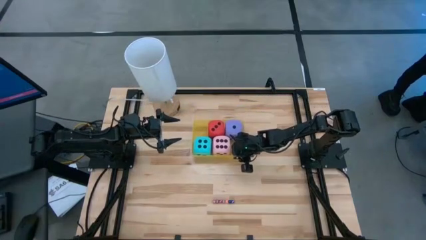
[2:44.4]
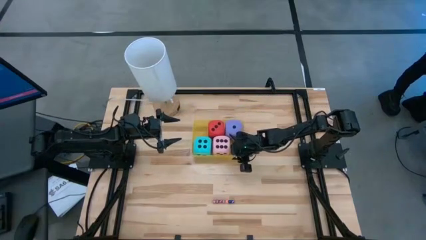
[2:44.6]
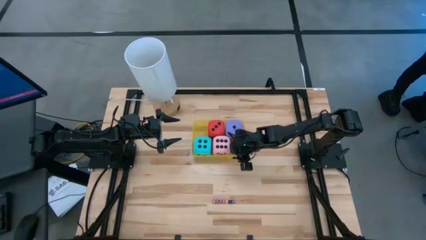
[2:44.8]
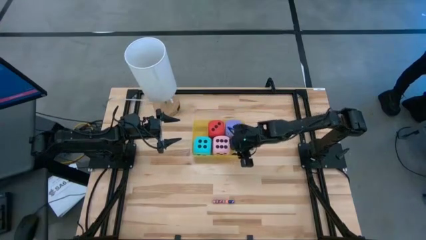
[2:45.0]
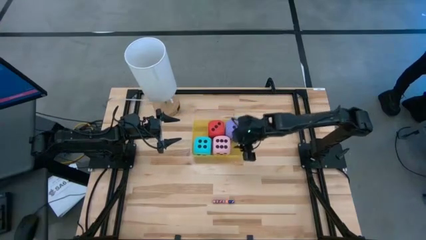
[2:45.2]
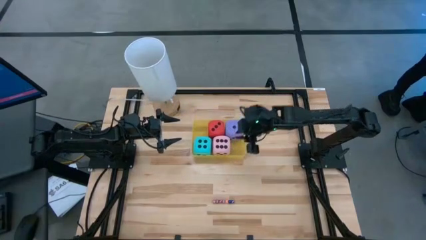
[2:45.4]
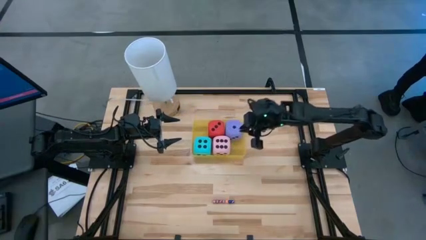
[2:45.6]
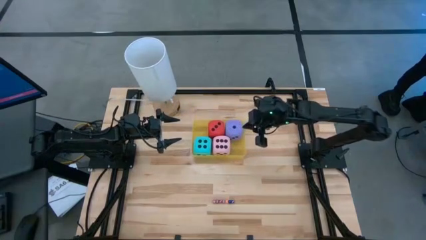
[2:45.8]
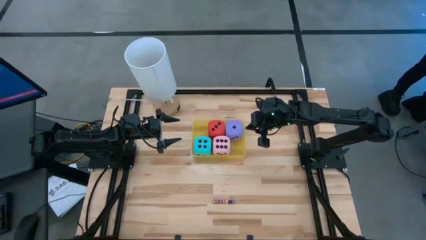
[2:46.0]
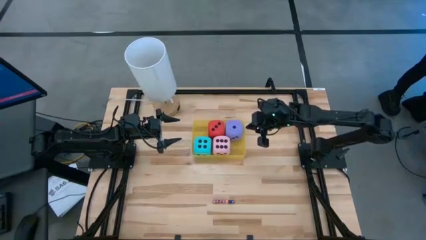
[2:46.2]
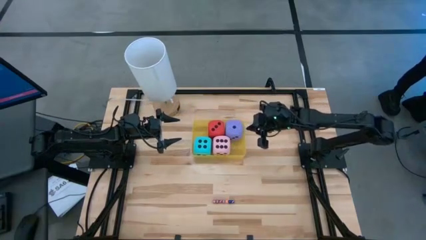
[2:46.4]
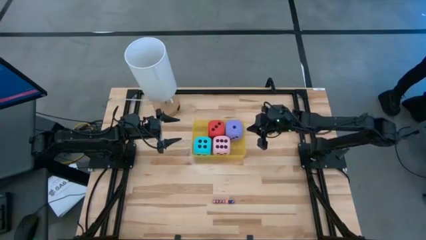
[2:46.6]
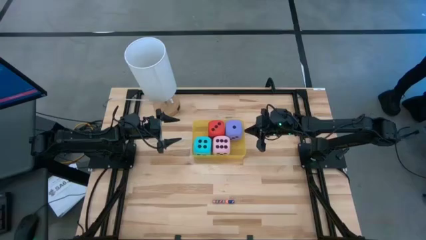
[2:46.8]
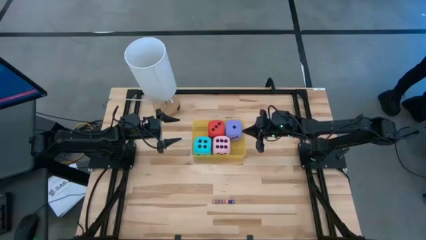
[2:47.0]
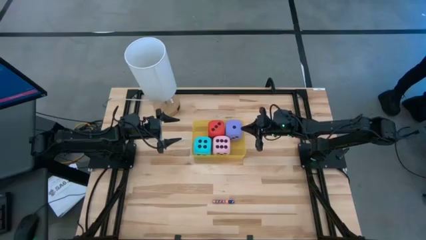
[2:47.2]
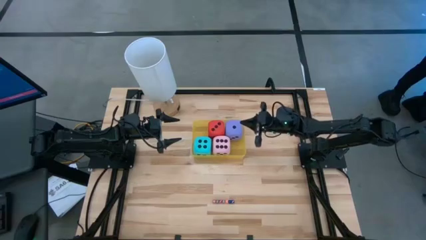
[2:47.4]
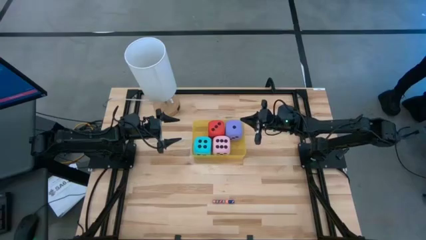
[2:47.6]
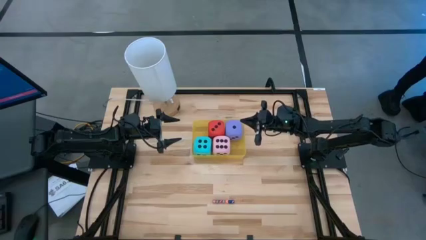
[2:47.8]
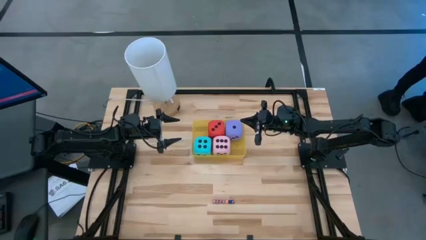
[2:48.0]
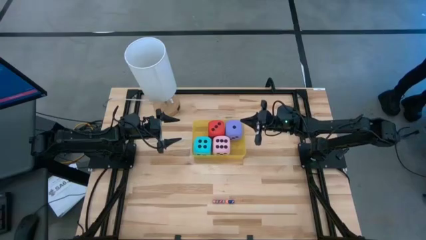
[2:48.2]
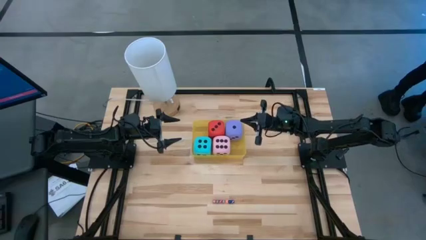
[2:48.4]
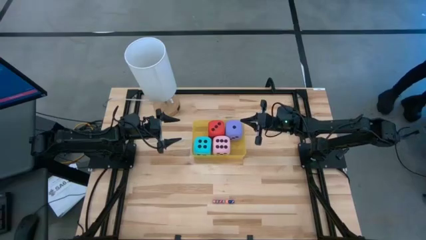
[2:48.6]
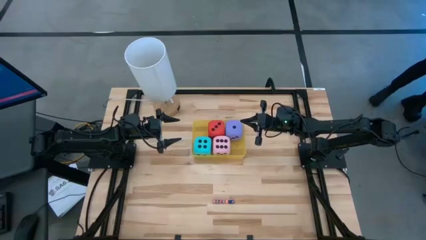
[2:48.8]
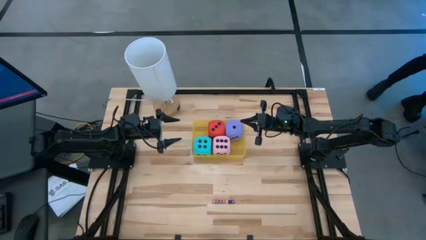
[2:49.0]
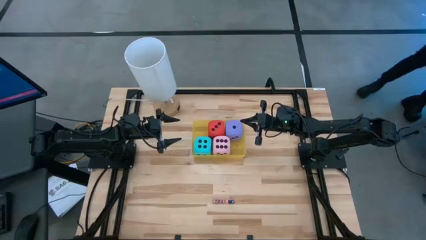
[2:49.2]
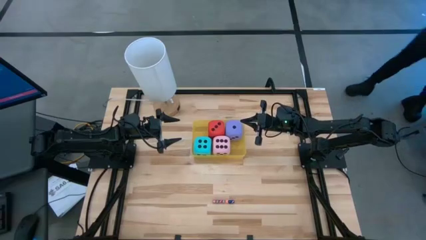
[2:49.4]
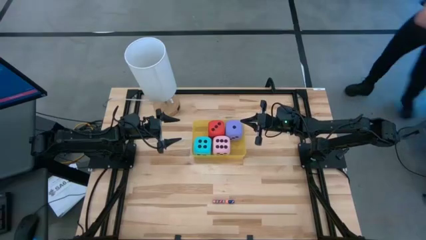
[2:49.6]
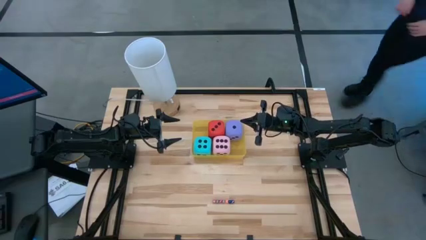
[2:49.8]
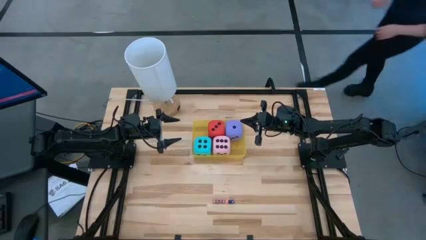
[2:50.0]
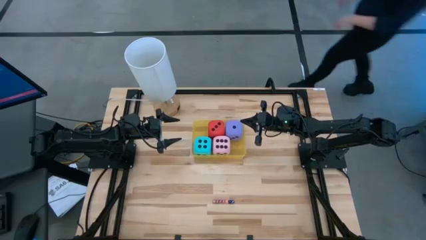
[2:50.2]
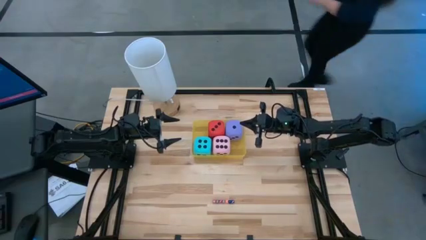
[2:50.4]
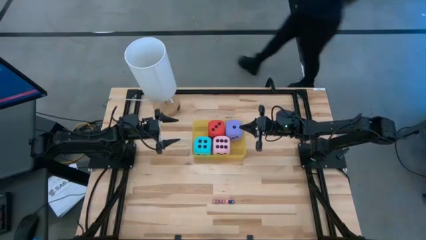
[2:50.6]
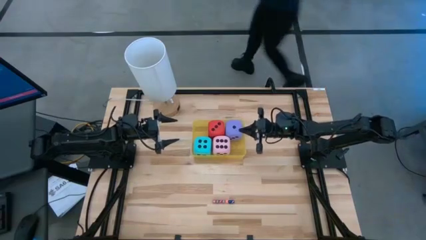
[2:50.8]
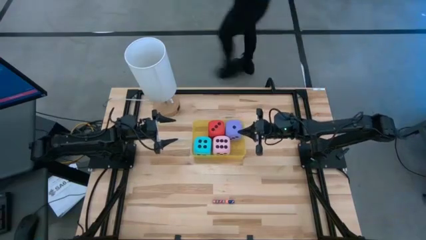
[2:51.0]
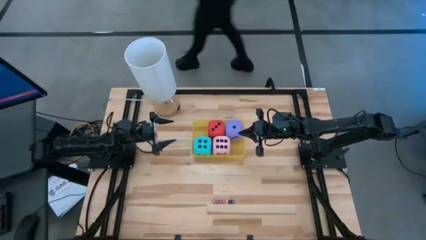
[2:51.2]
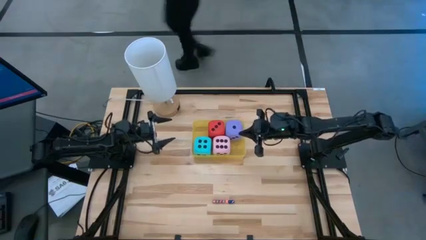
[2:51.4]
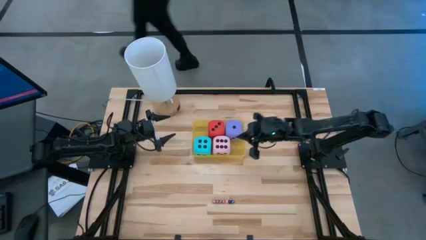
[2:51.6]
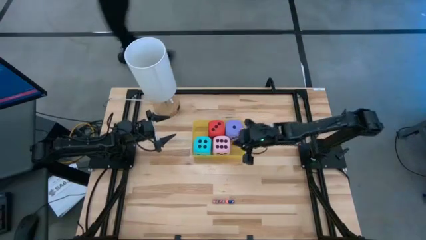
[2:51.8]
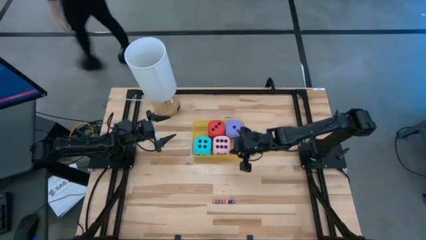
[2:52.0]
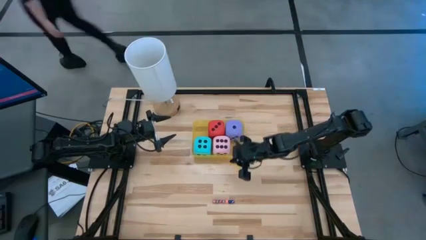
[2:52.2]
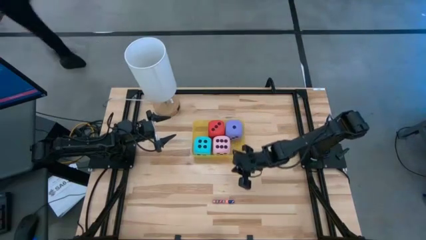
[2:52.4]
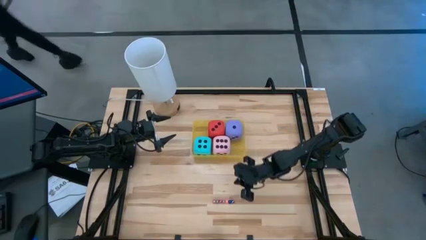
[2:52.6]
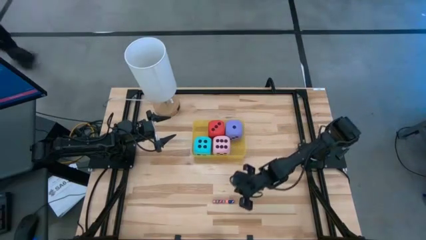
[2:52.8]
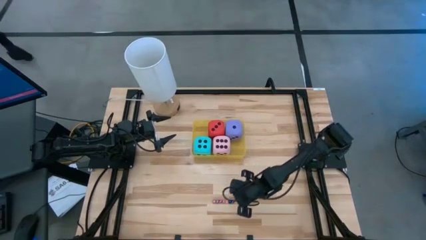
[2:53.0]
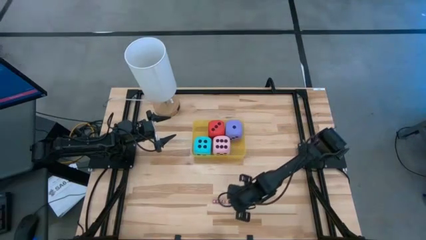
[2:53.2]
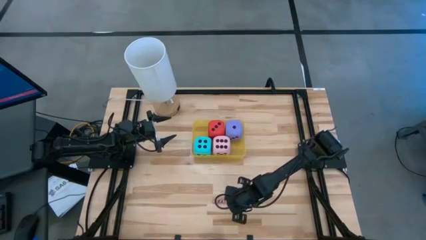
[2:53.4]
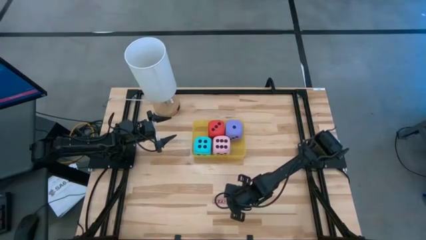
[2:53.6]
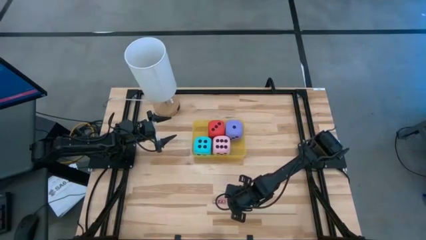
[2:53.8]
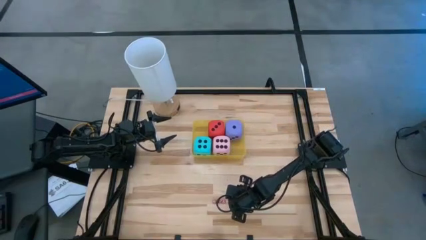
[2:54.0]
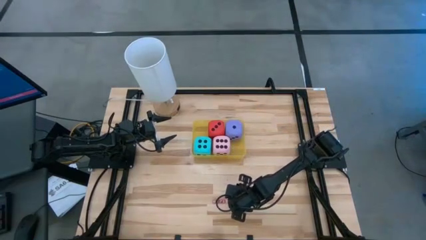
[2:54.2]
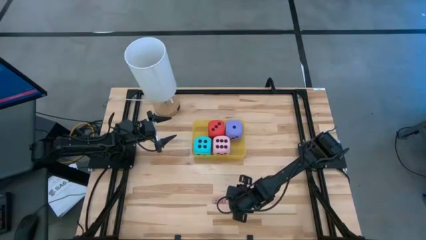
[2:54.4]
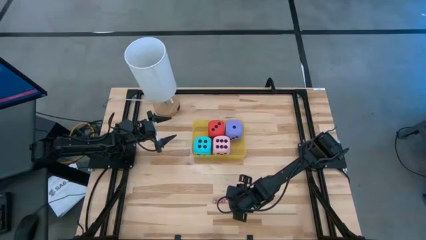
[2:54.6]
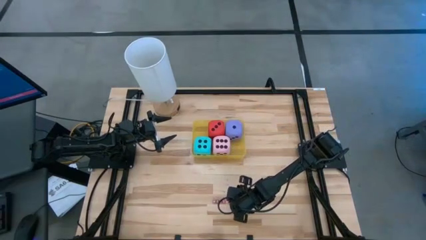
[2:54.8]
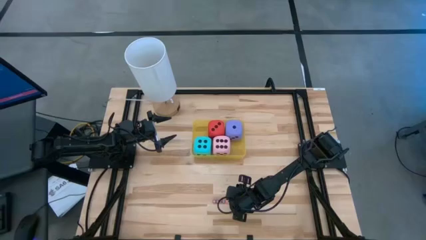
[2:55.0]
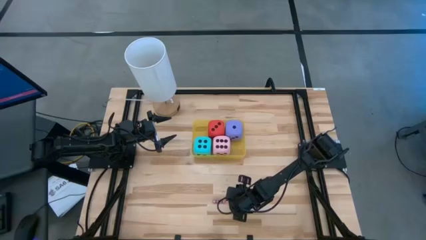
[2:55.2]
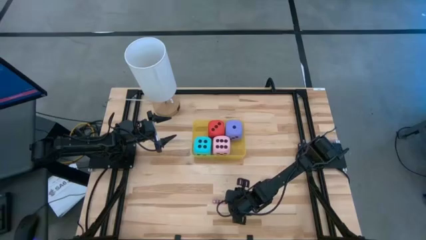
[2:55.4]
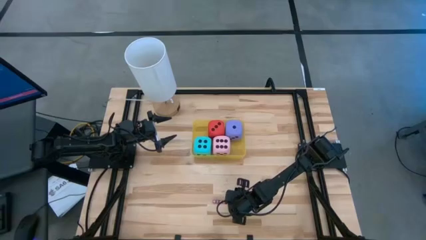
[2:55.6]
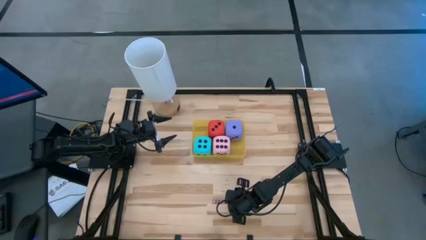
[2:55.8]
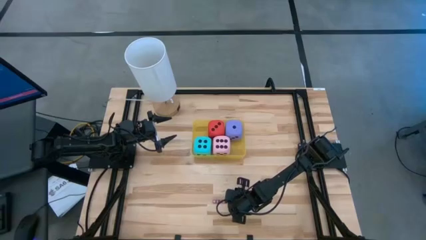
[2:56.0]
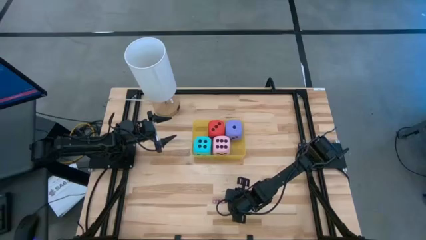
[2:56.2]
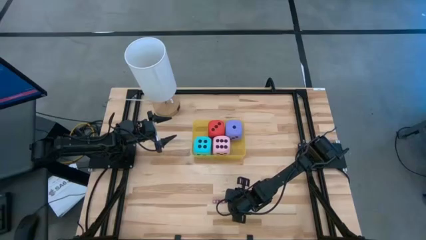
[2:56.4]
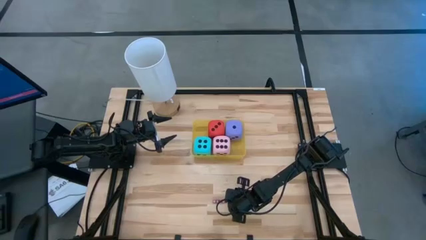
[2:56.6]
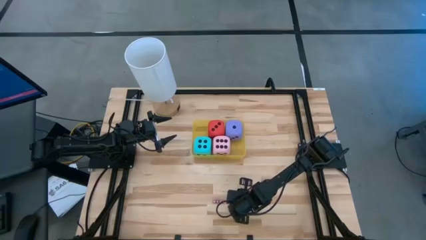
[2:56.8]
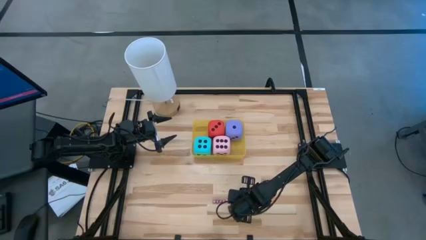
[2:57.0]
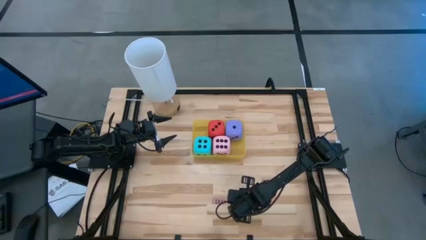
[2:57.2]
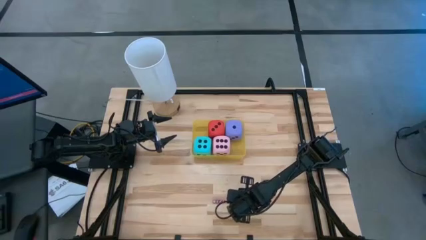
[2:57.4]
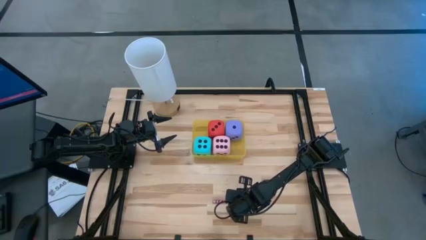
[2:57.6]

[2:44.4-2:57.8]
Task: Pick & Place Dice
Put the right small purple dice into the yellow bin
